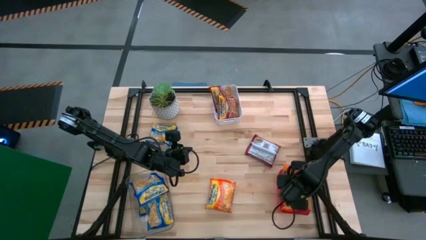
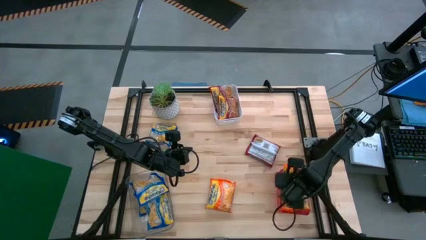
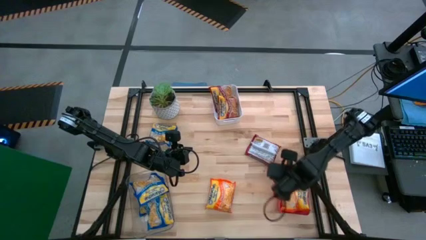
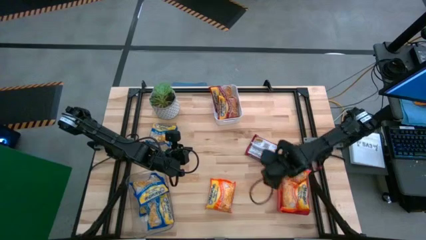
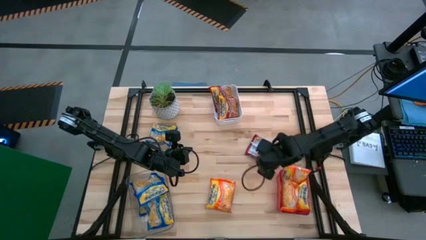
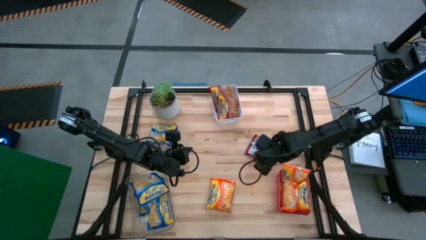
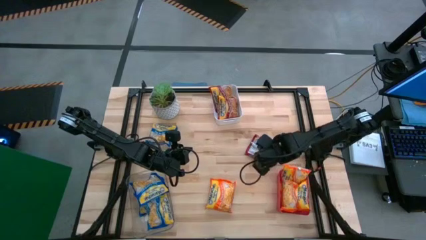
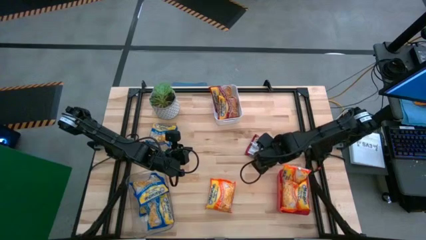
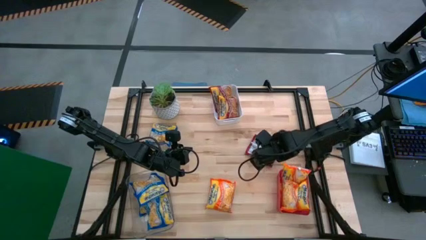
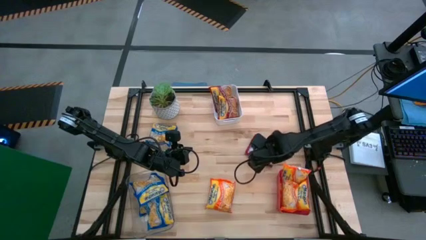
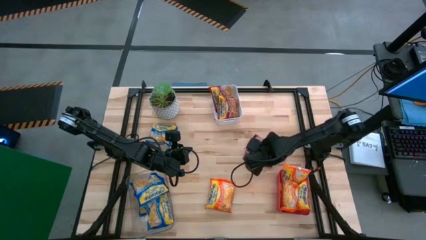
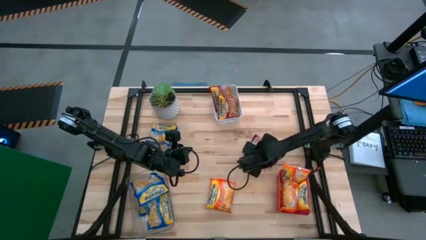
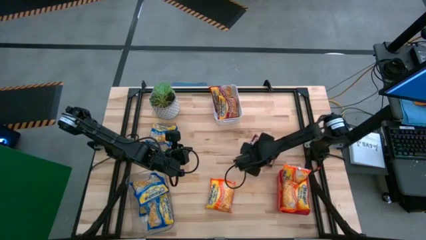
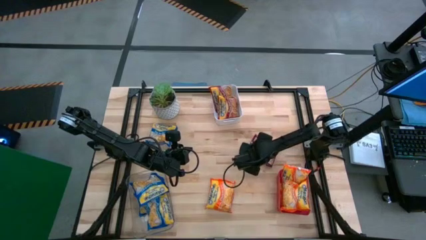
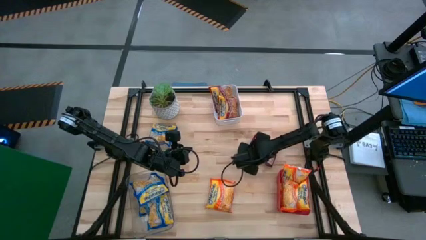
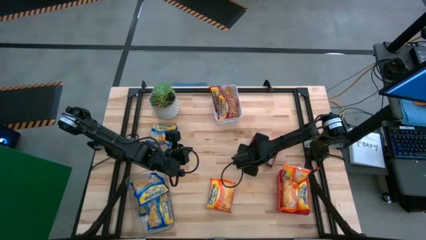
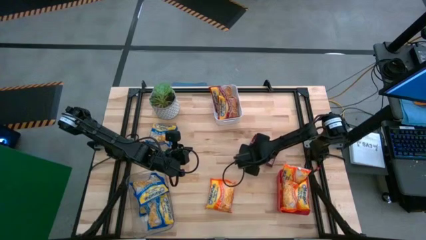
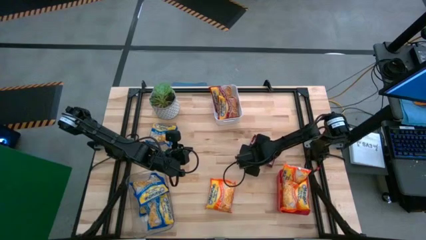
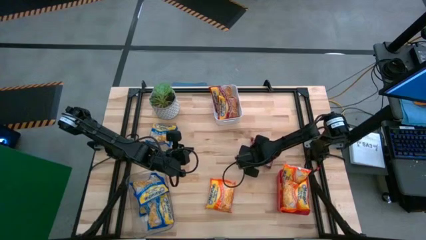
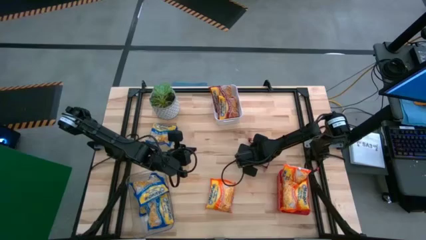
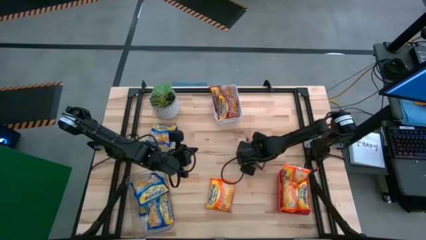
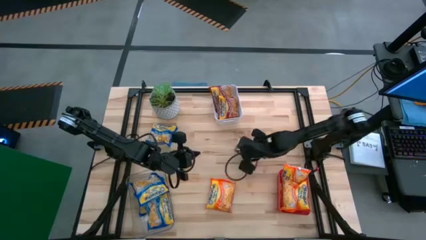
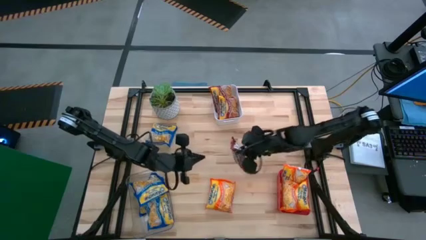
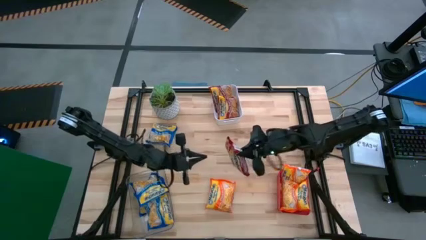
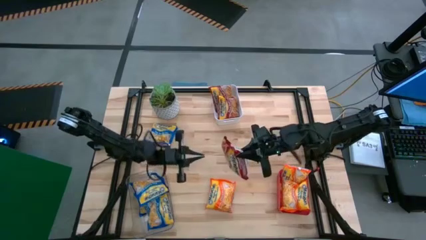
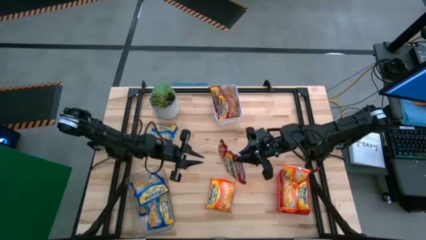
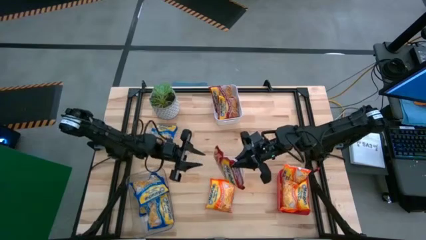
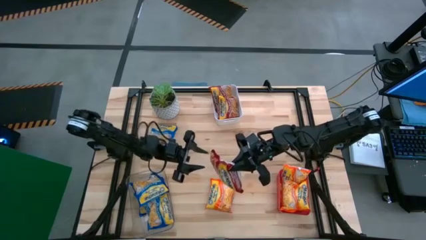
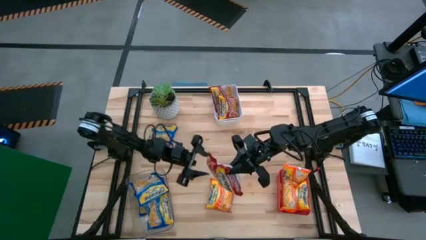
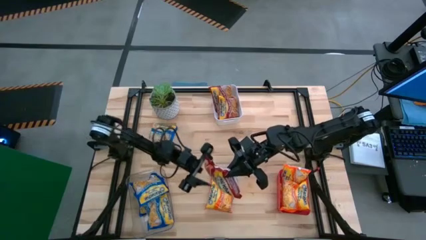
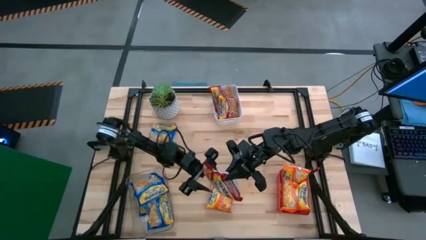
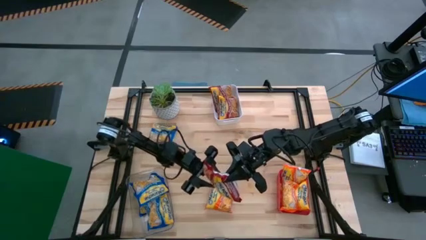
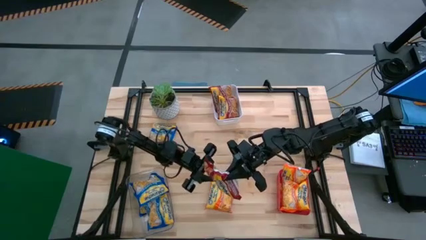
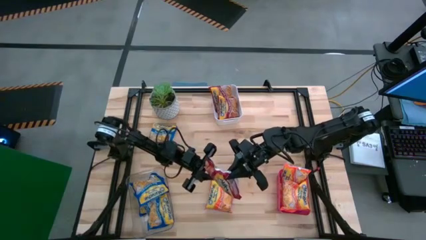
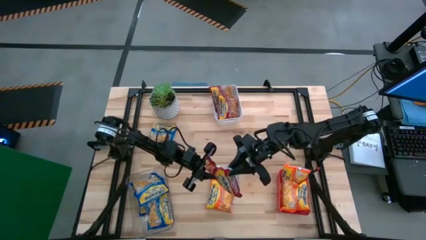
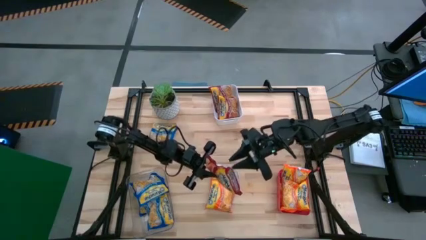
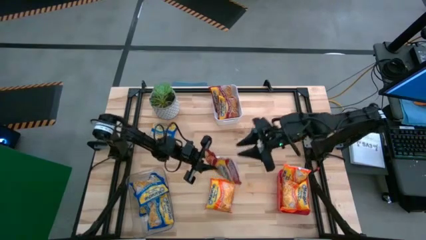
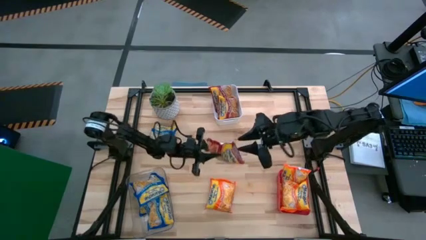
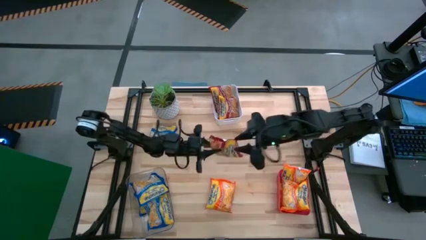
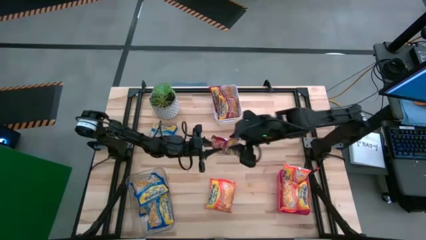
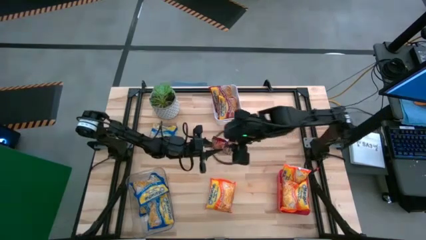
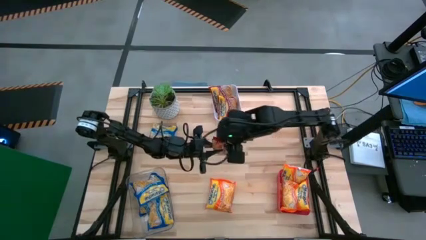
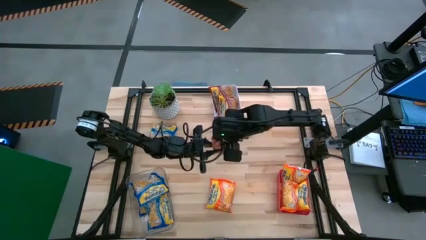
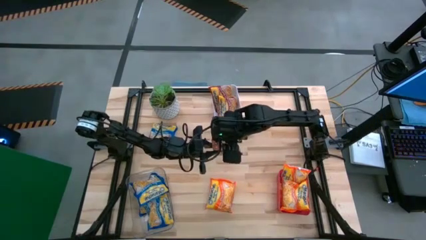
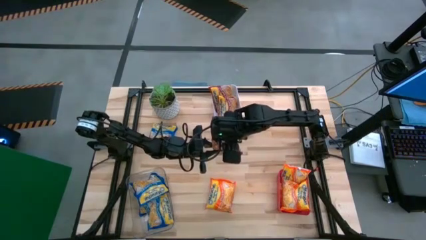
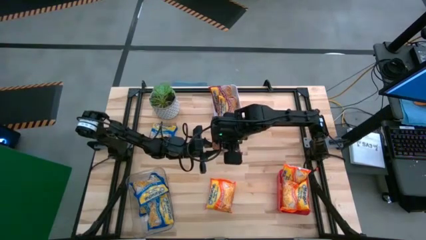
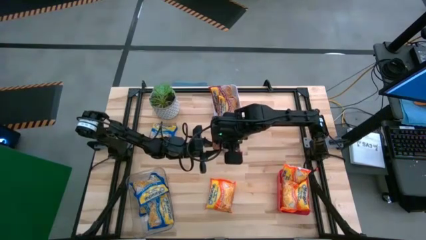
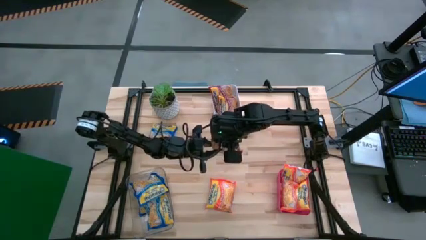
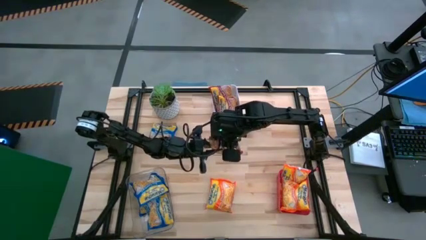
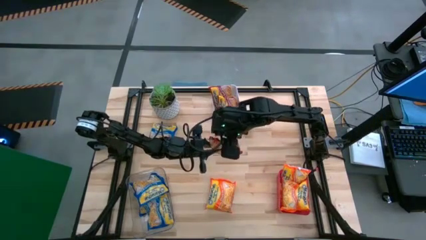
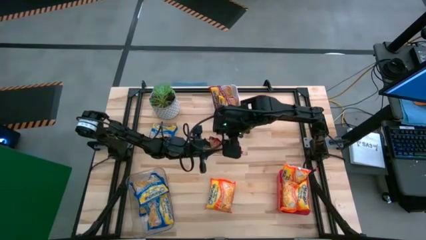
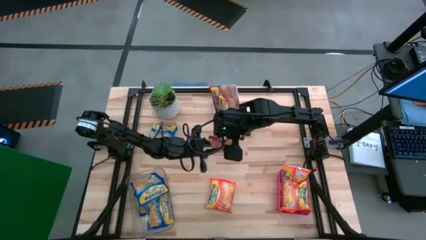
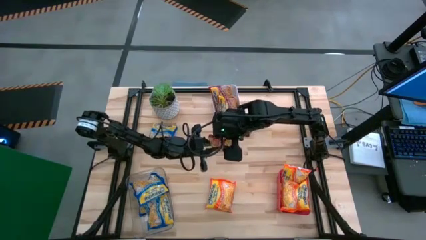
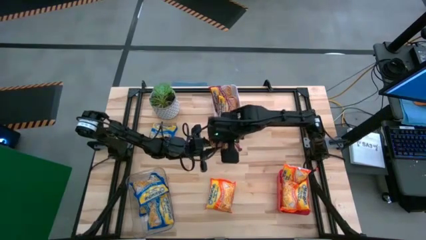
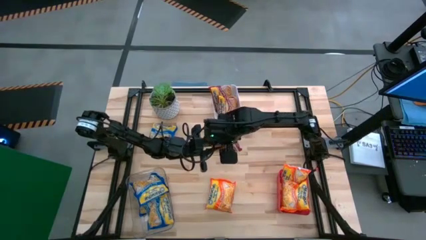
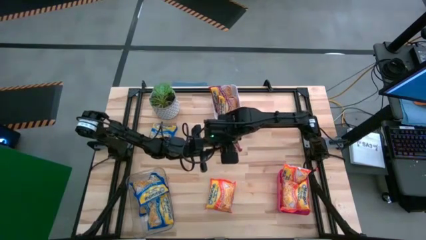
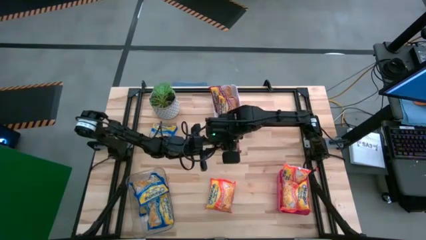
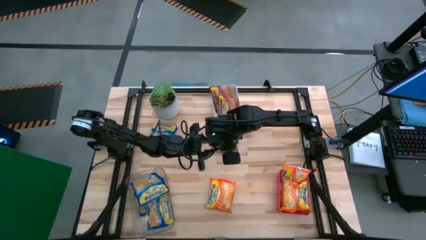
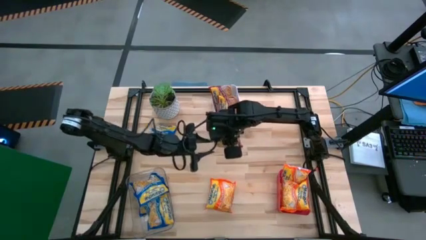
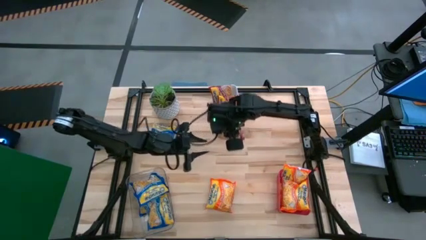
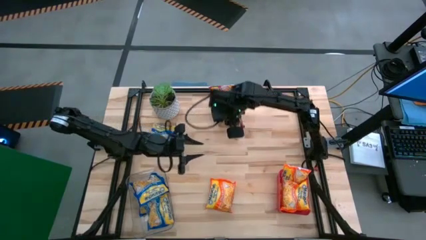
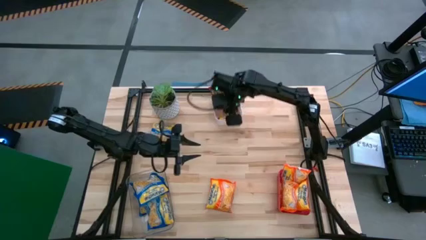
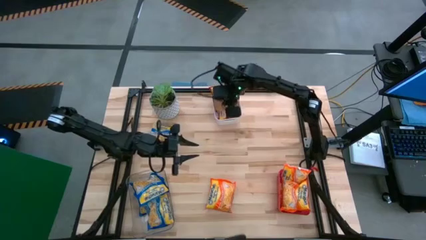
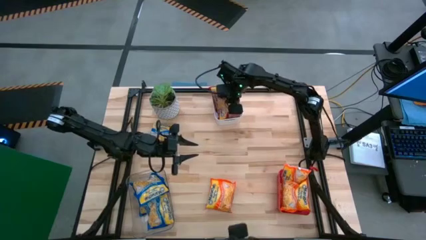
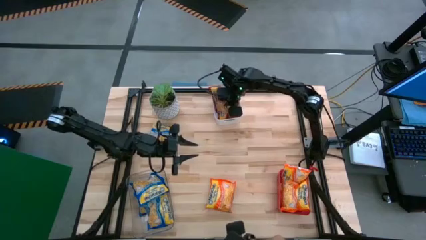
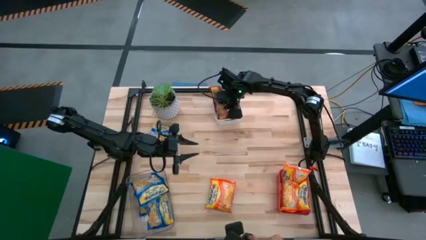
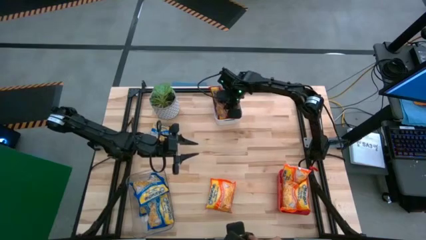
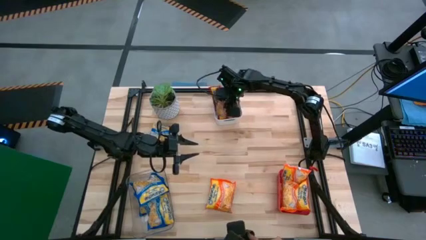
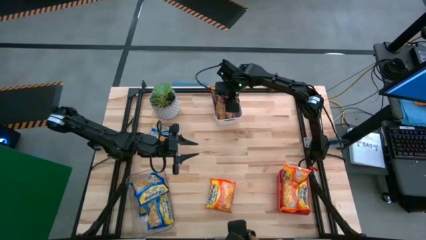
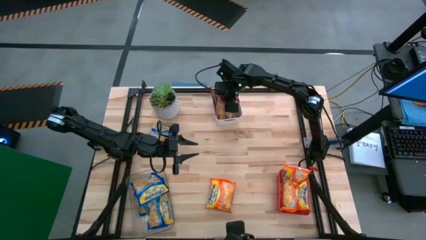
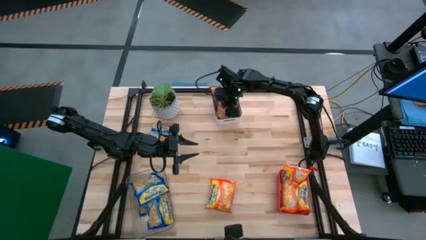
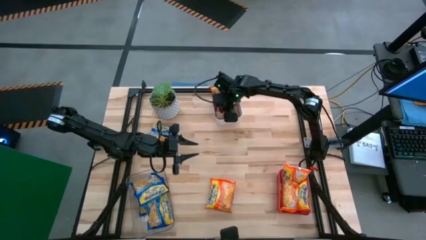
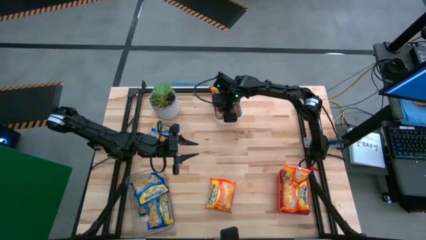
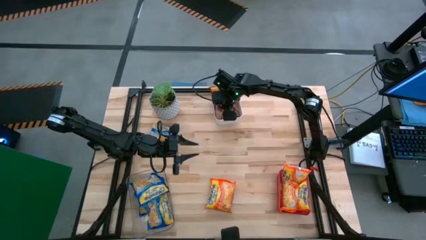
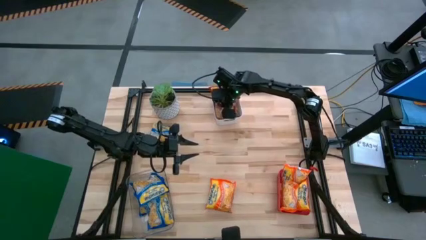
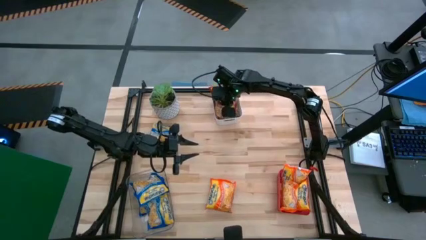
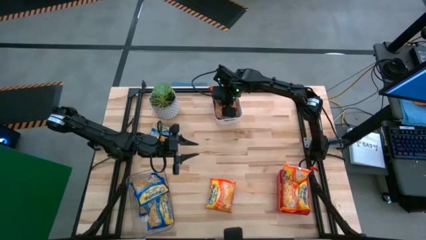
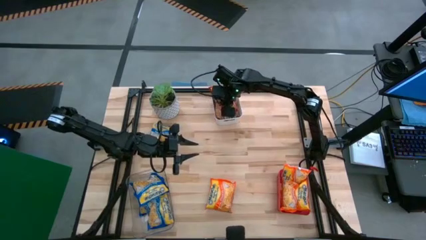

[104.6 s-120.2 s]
Task: Sort Maruchan noodles
Put the red noodle pack into the white bin

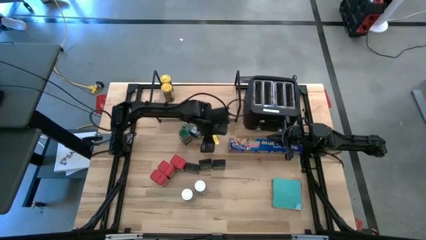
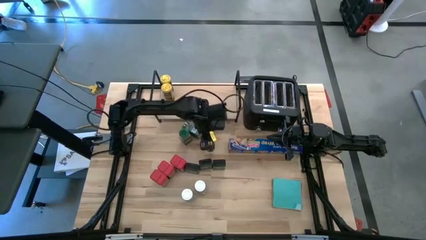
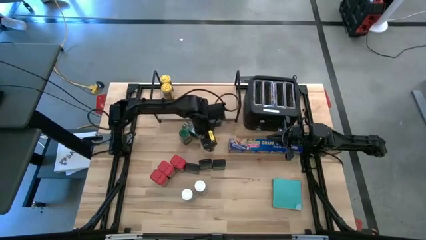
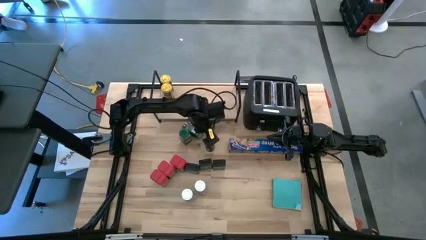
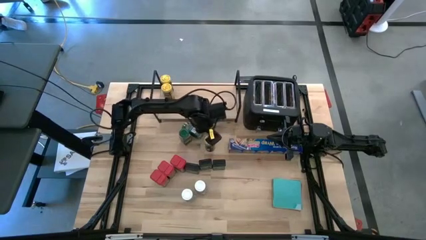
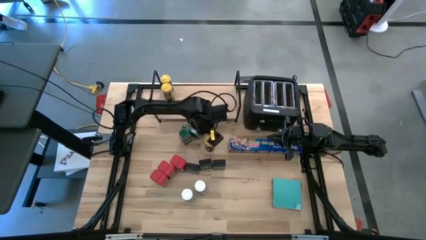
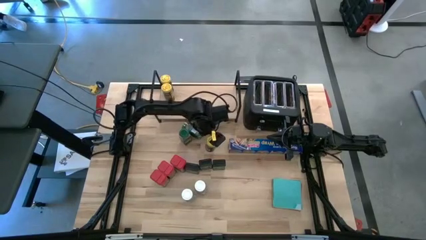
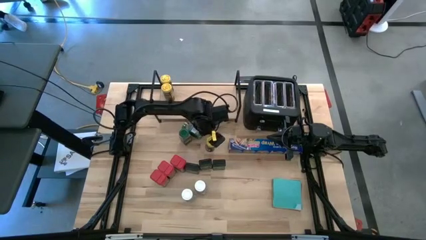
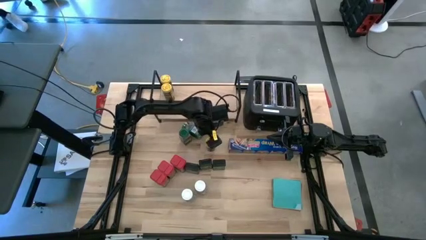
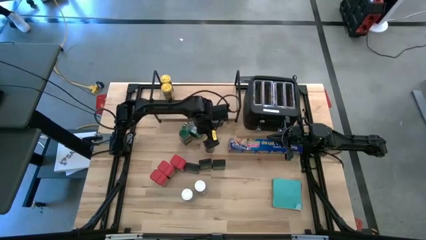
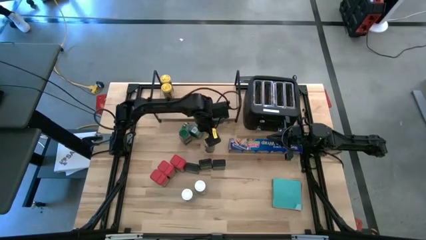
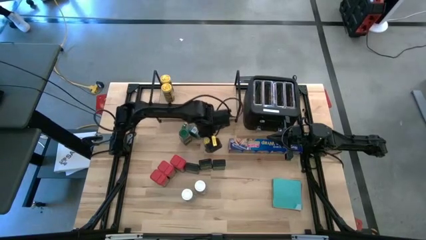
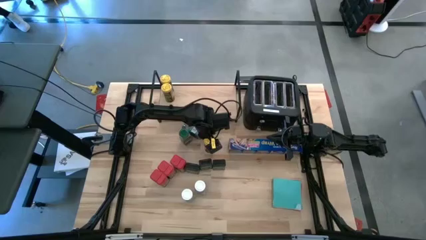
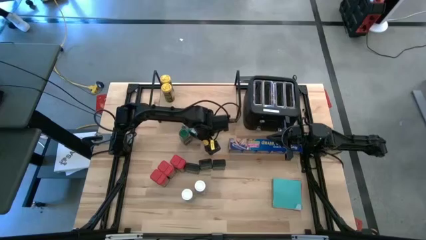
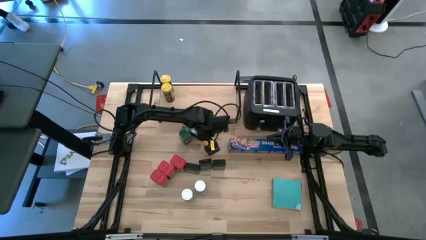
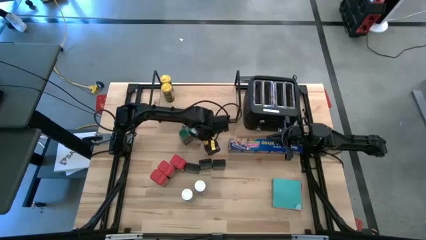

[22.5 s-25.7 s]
Task: Shelf spices
Put the yellow seasoning bottle on the shelf aligned with the other yellow seasoning bottles
